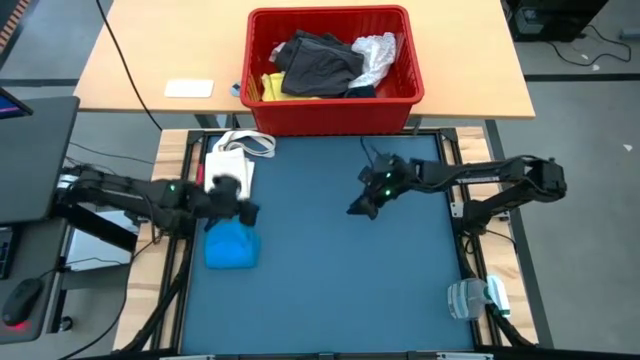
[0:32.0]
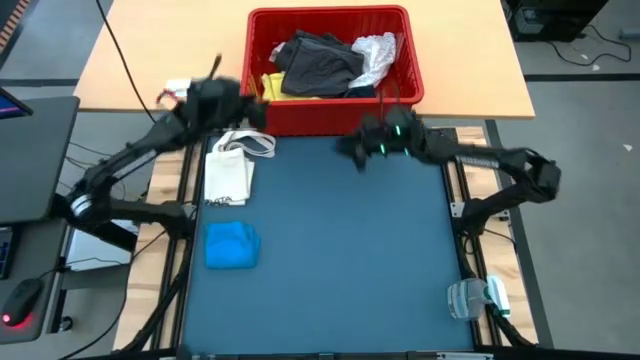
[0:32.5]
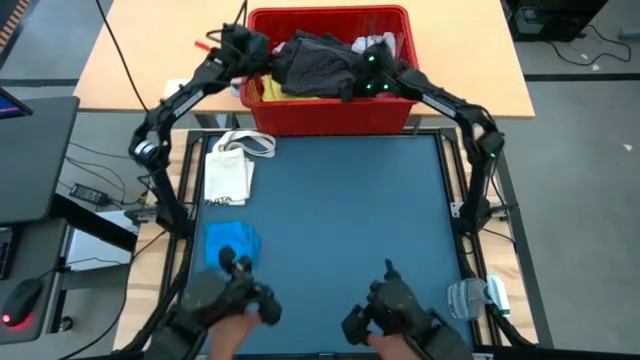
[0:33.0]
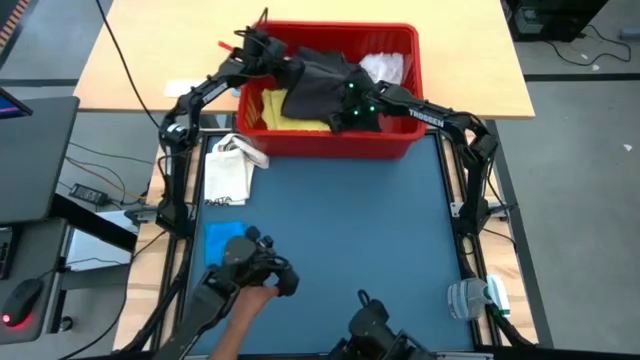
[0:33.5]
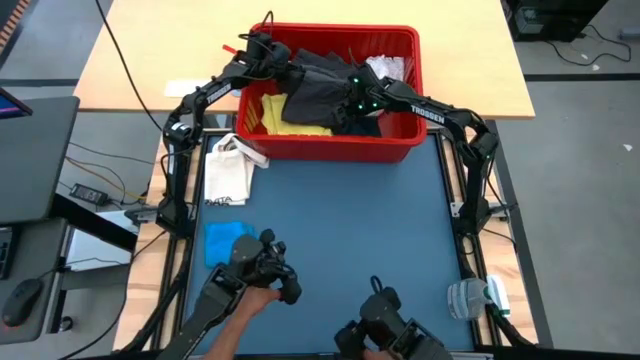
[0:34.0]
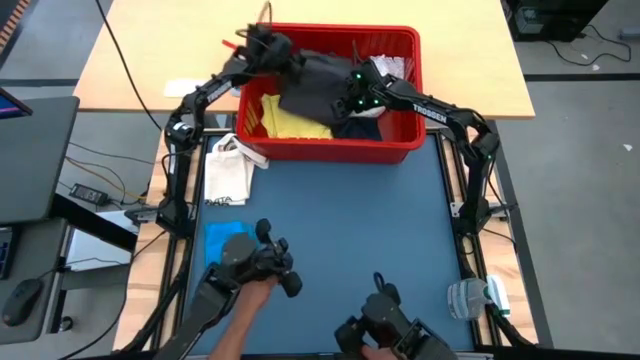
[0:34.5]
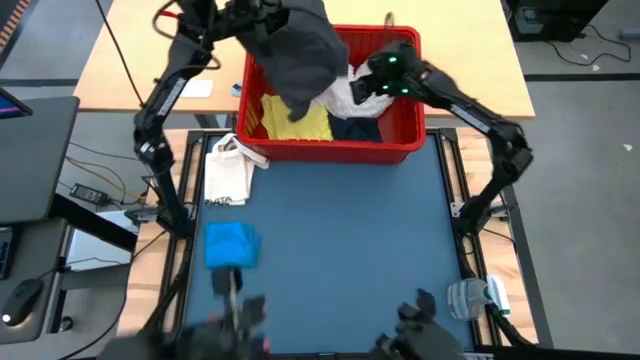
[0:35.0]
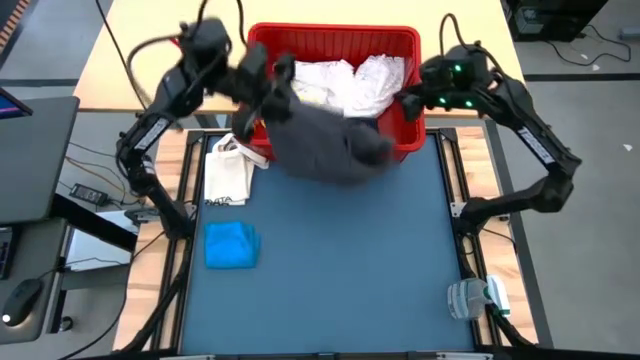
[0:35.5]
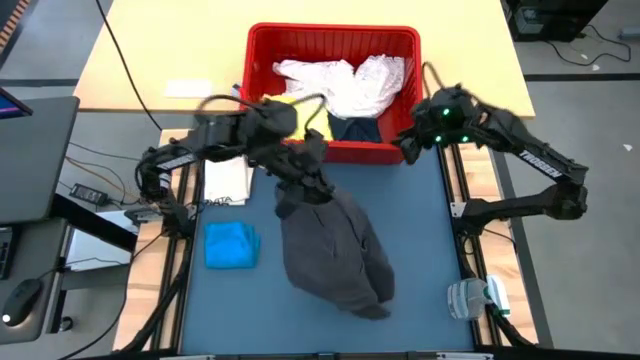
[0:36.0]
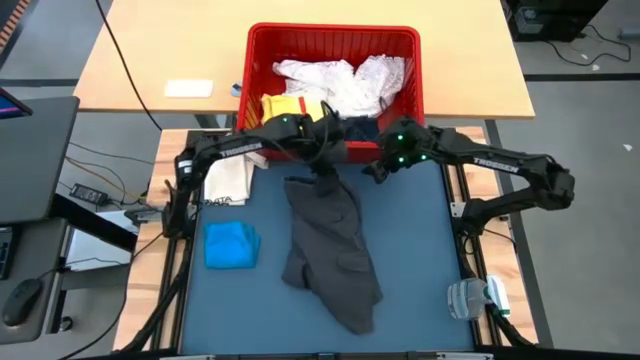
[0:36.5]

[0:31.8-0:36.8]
Task: Fold laundry
Remove the black shorts from the bin

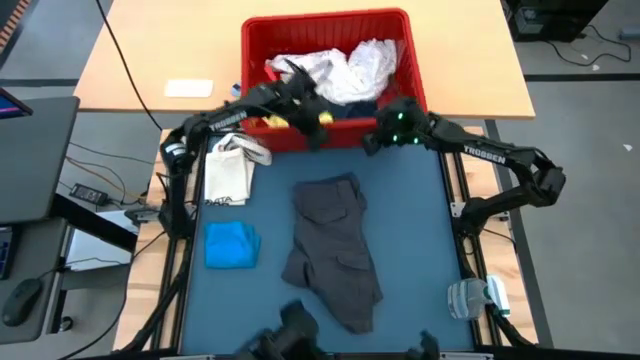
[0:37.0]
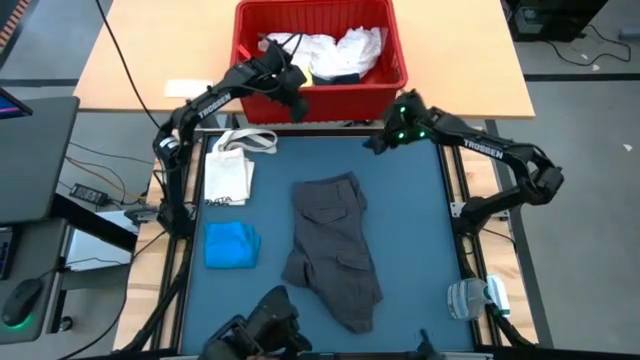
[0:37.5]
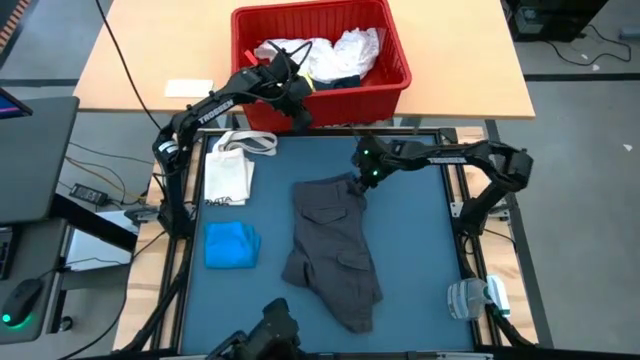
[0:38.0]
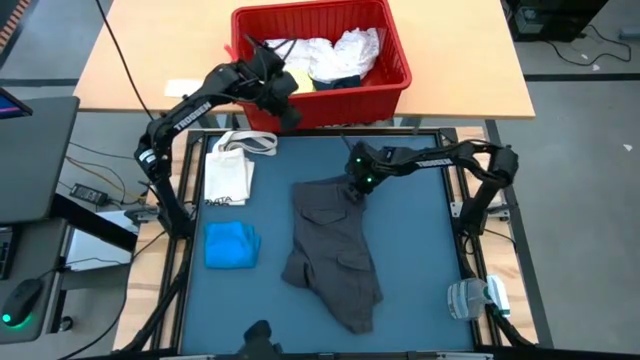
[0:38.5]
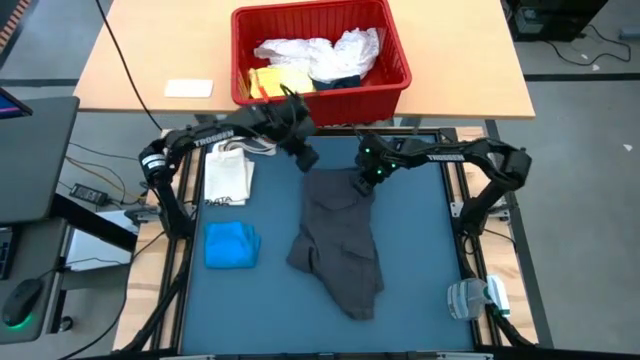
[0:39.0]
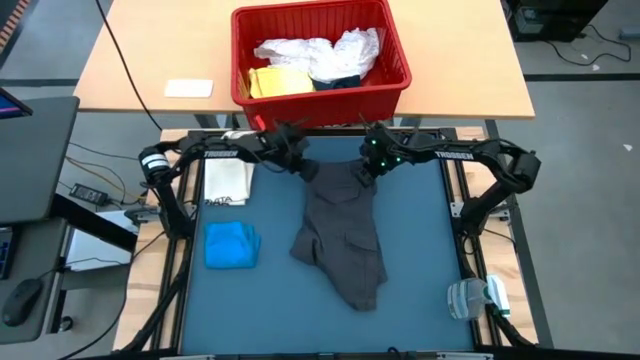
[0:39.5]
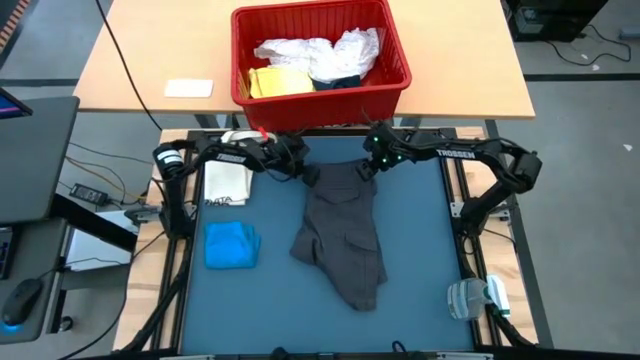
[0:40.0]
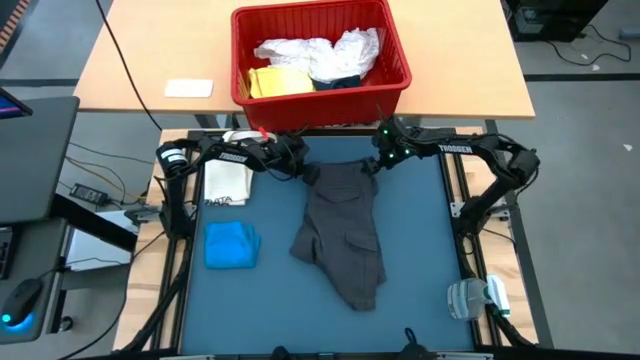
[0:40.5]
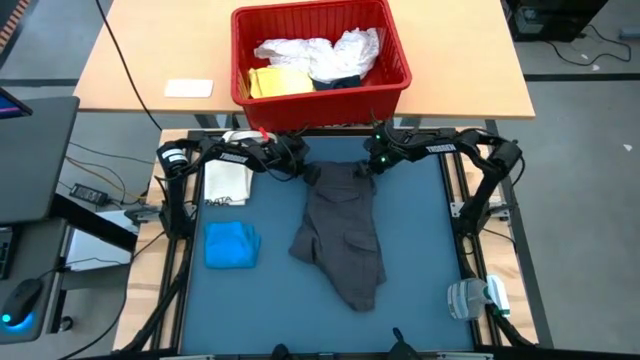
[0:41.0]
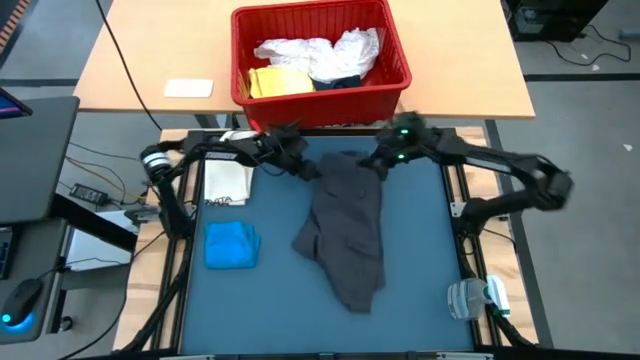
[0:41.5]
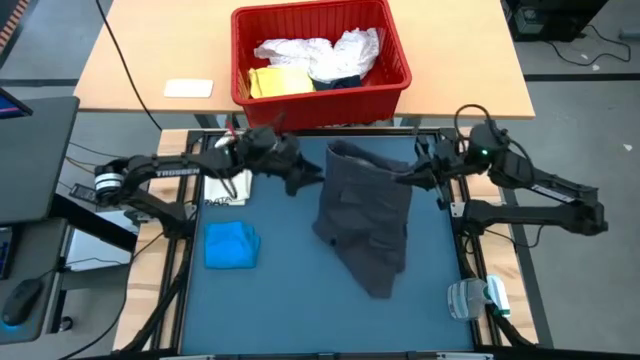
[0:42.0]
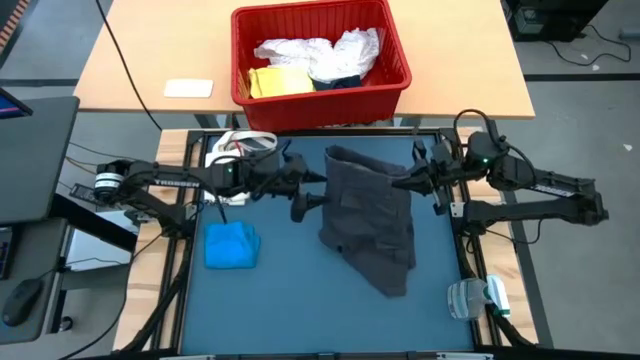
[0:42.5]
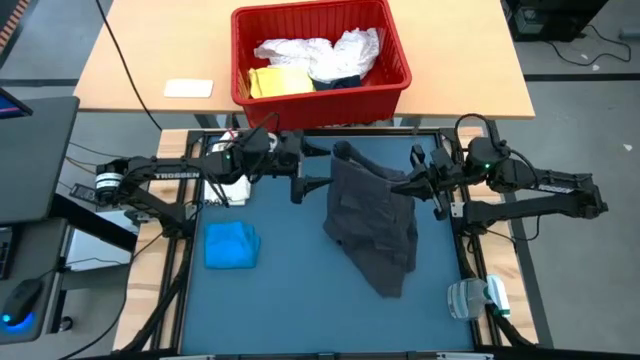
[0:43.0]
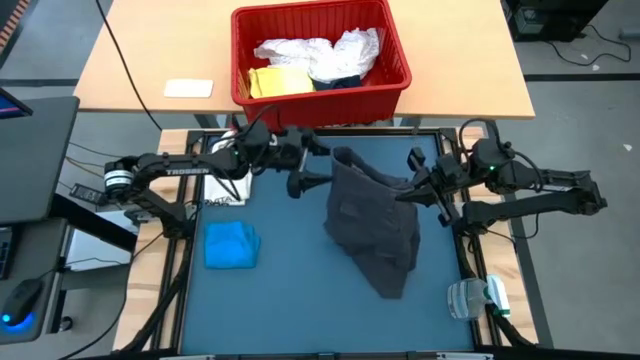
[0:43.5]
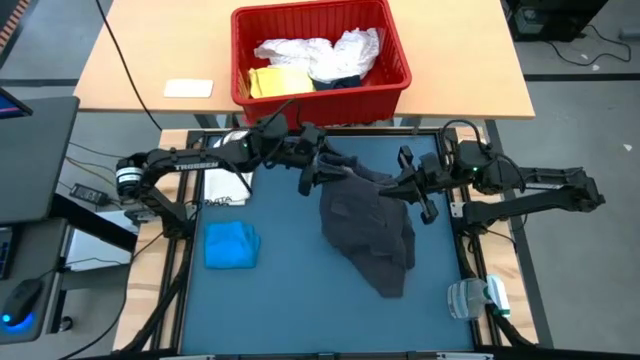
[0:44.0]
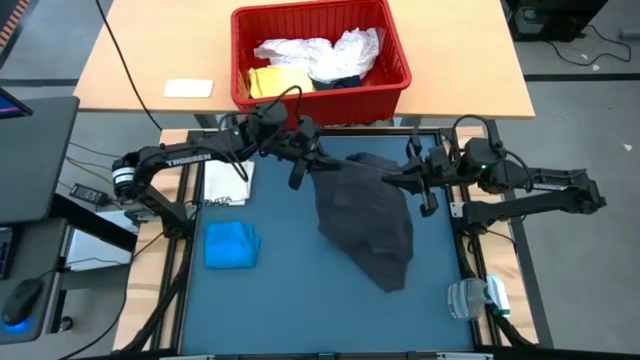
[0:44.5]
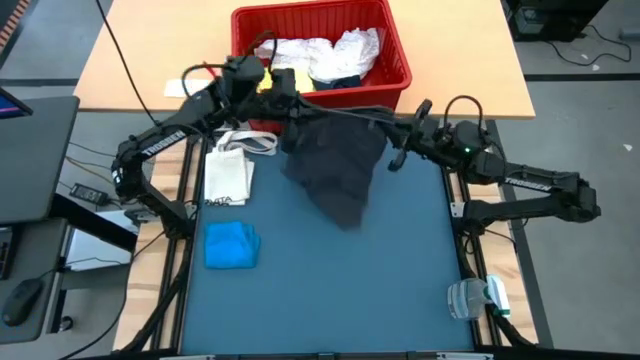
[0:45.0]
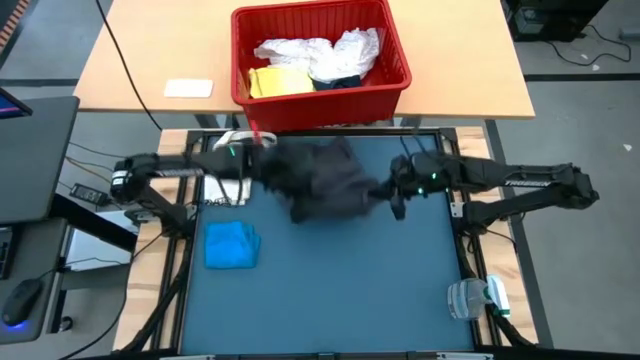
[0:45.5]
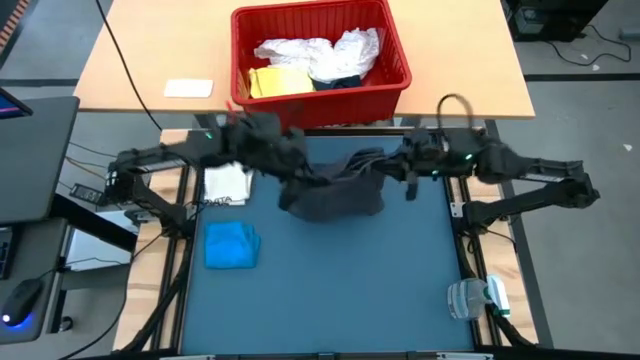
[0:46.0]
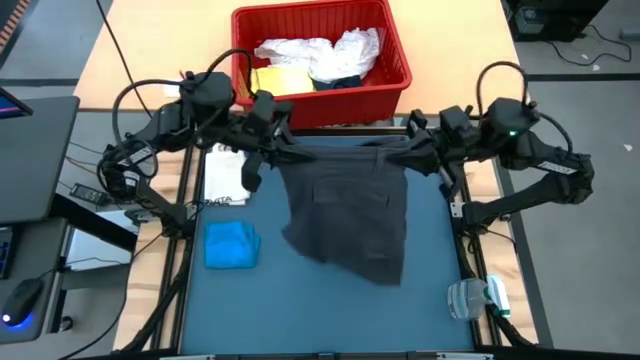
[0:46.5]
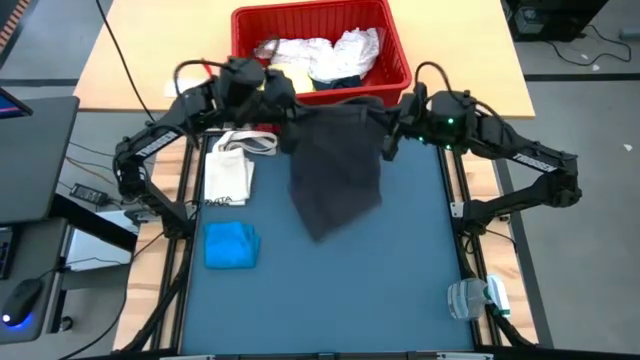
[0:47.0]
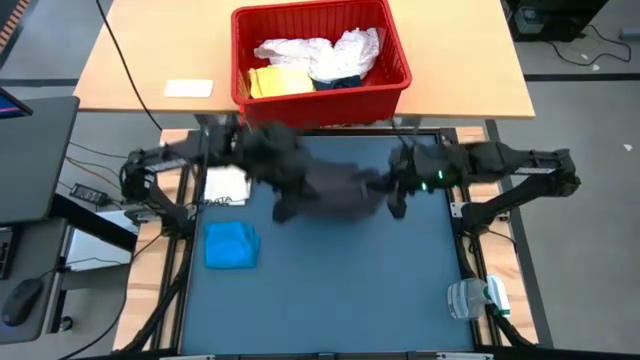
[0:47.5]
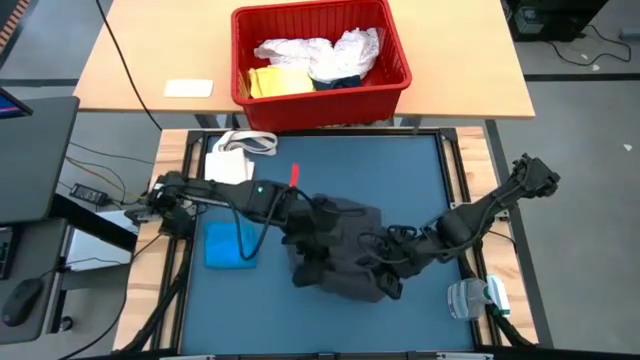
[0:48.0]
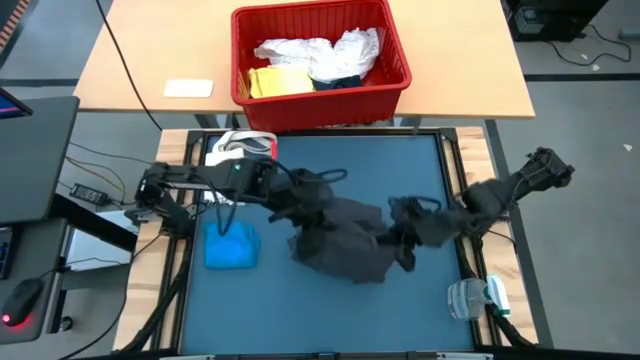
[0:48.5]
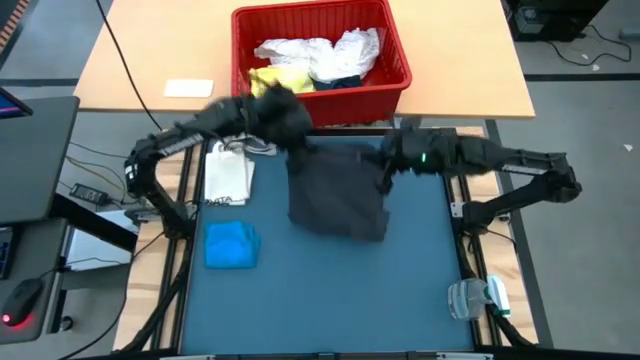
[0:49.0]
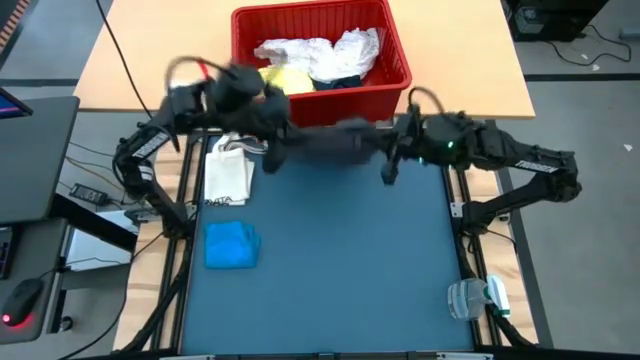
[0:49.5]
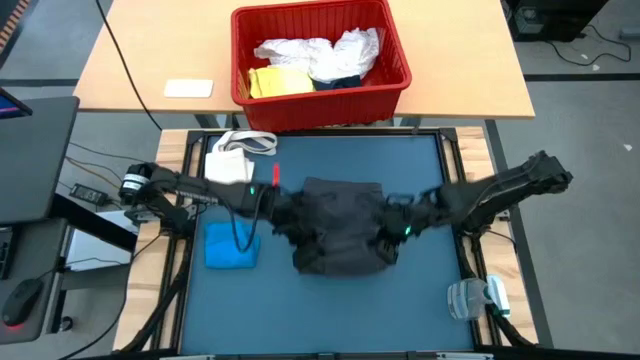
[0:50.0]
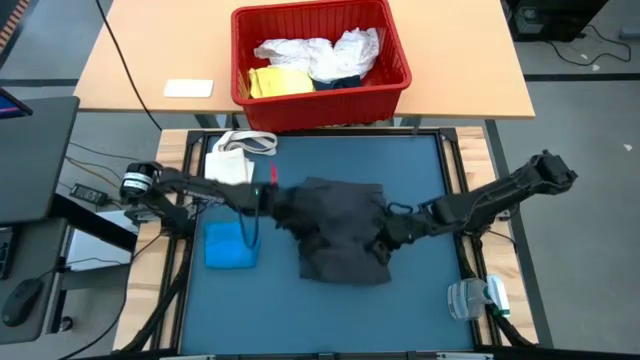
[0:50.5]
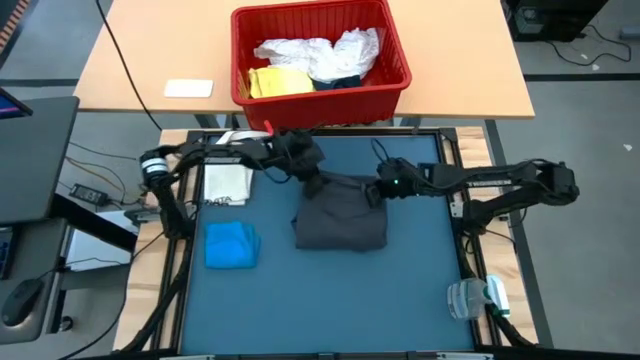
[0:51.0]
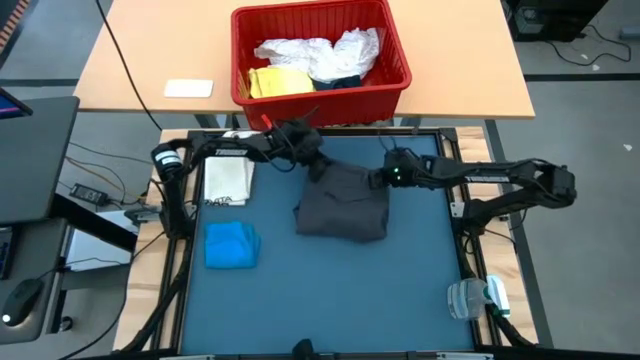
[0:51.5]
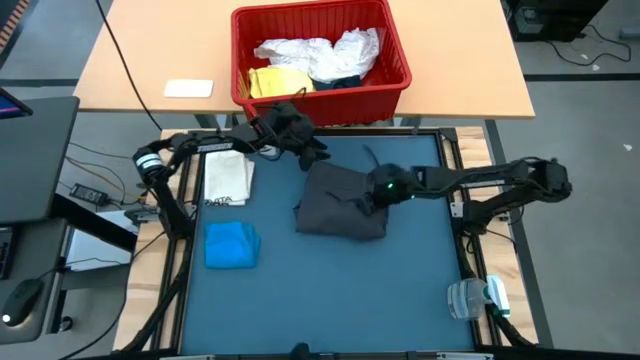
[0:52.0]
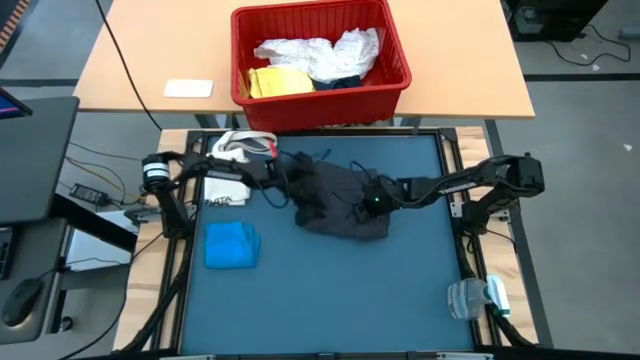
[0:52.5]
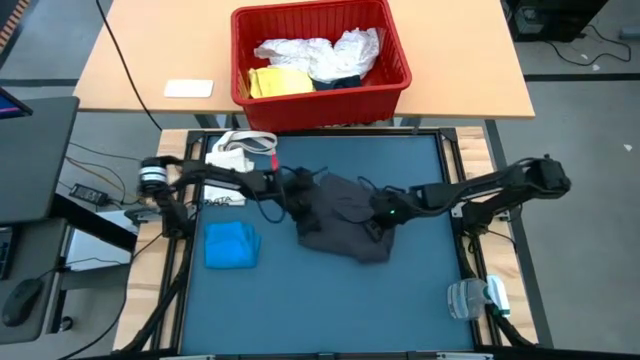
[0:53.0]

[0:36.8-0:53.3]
Fold the black shorts
